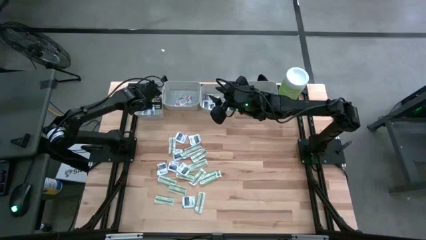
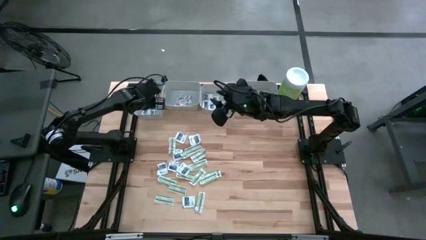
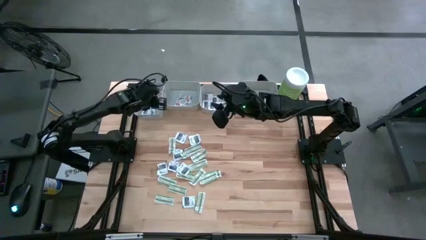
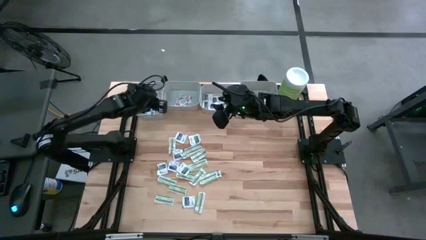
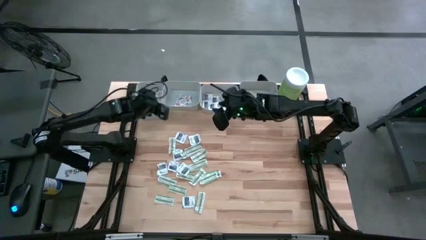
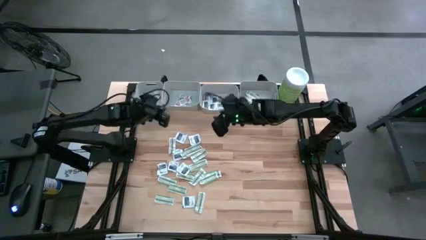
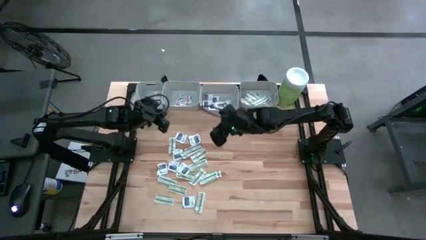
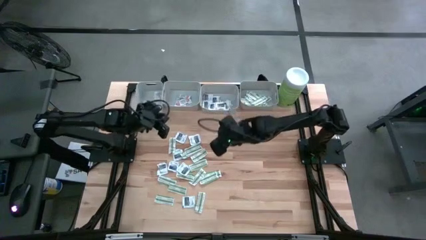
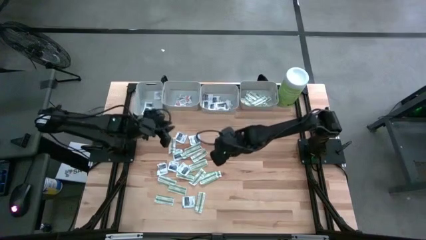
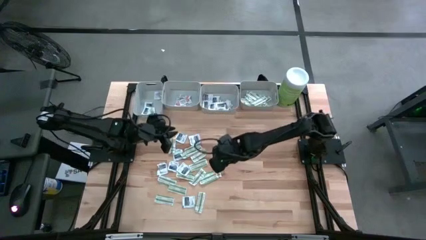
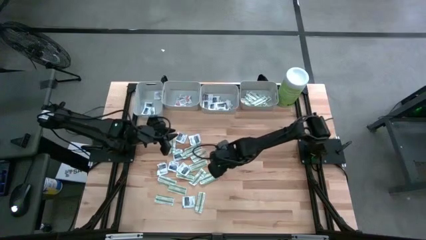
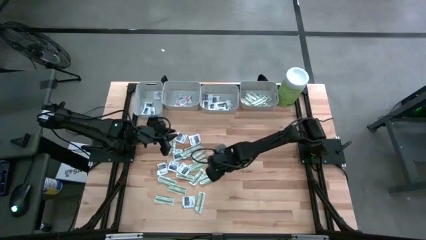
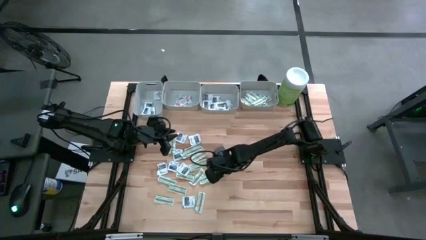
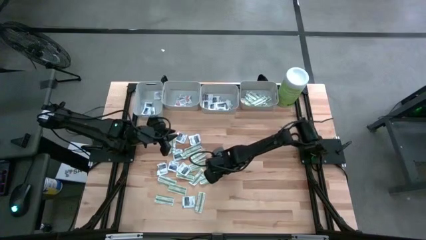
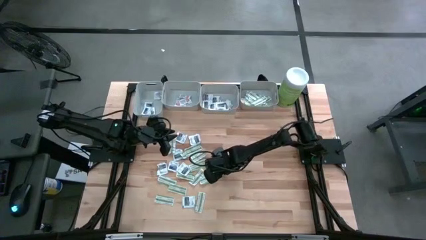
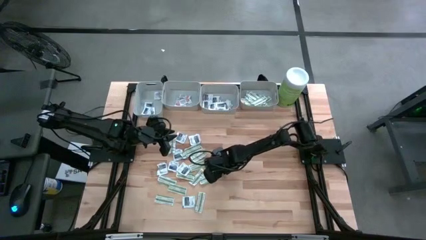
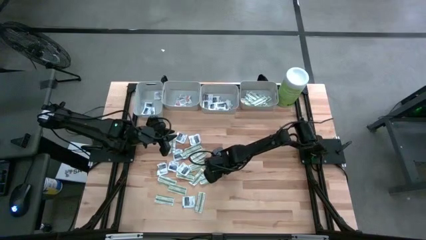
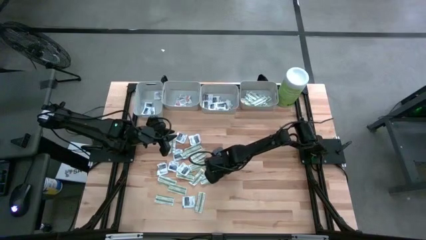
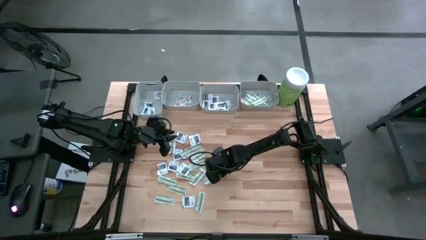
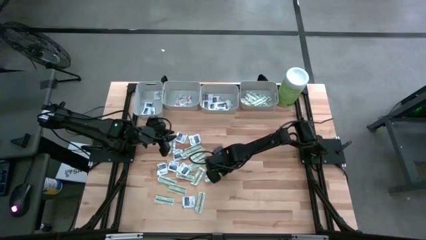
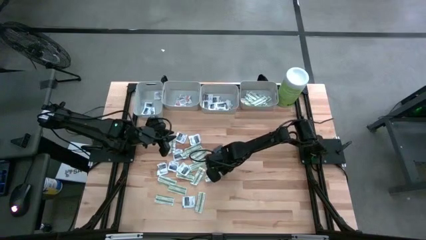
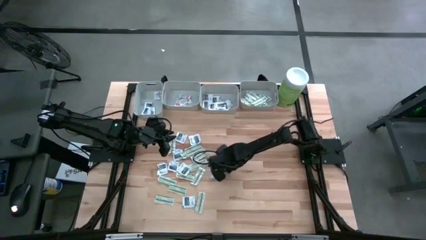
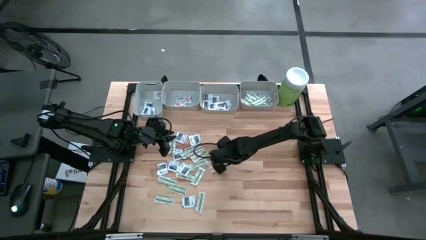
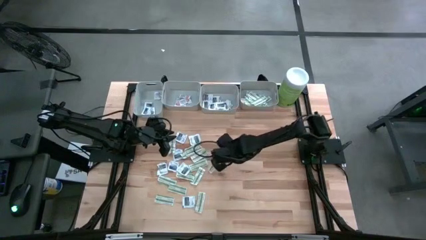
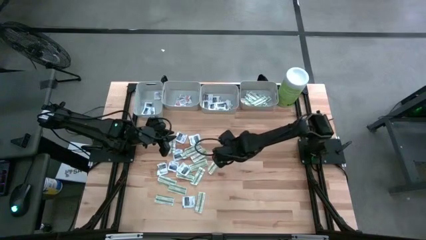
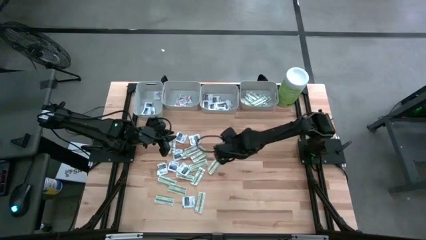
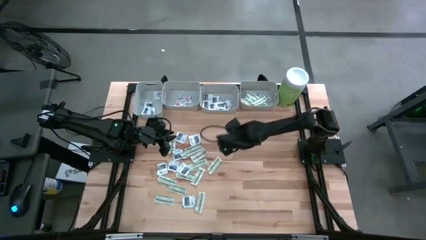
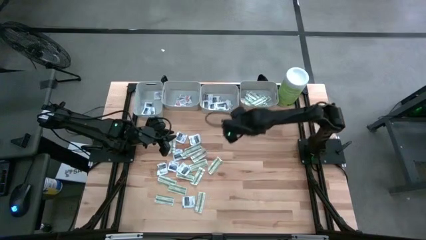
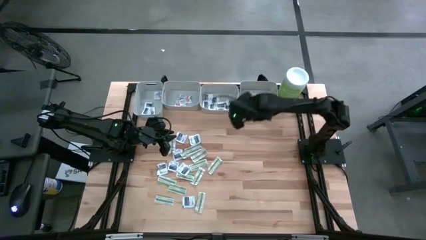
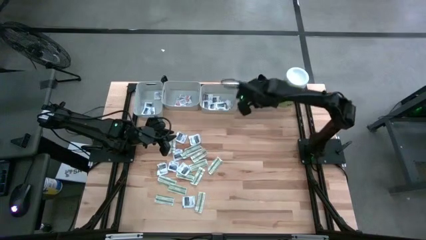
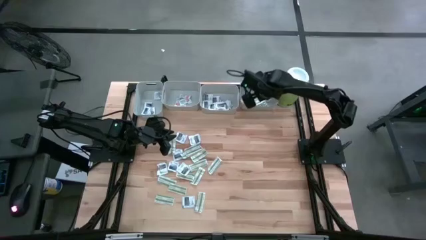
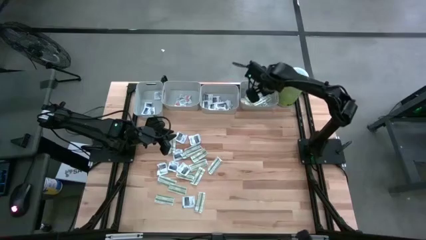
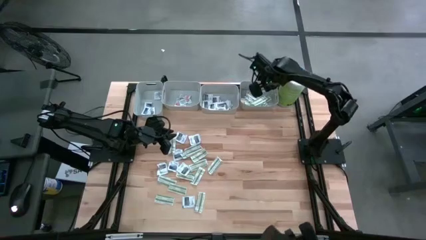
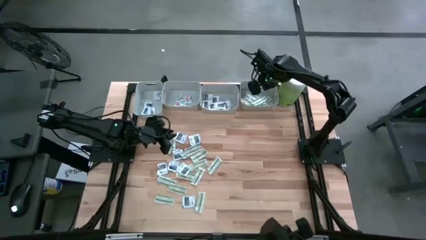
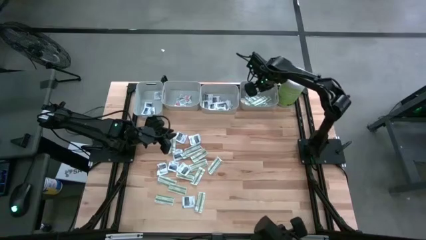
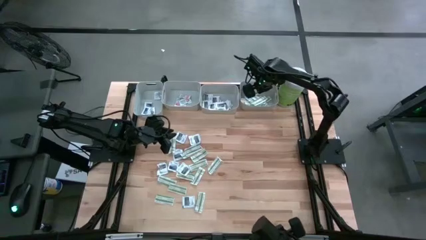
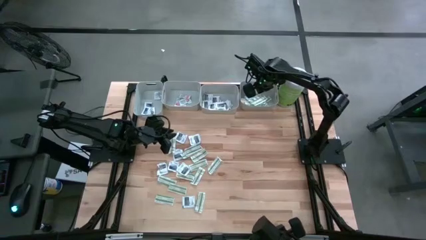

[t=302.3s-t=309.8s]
Task: Pick & Place First Aid Supplies
Put the green bandage into the right gray bin

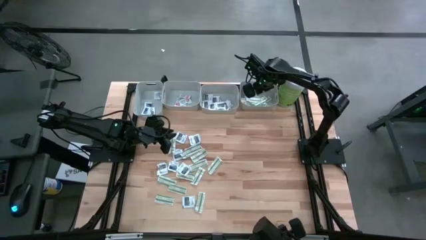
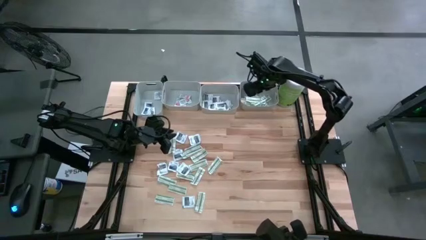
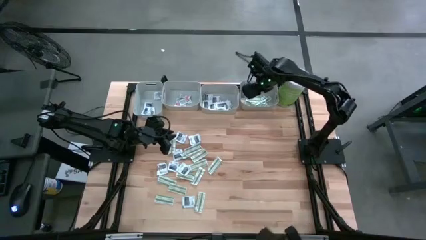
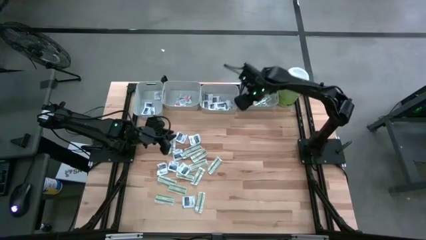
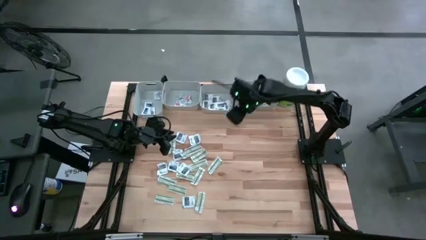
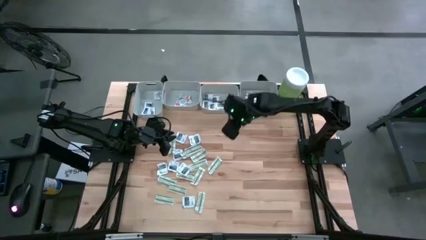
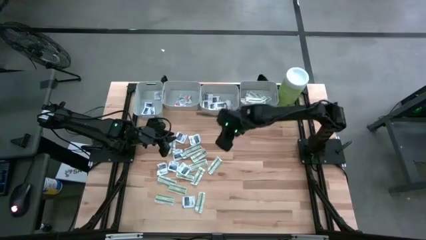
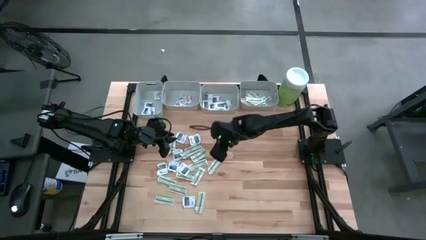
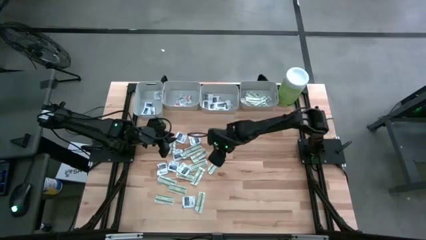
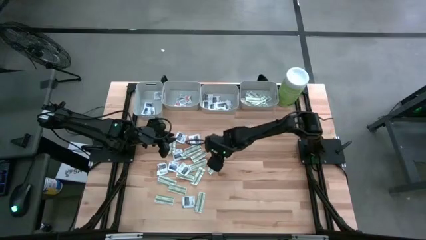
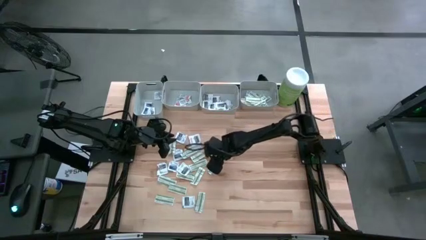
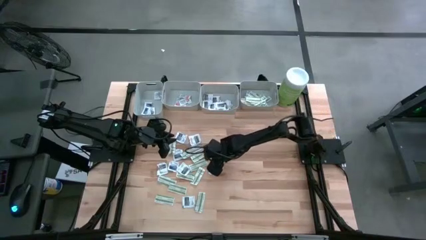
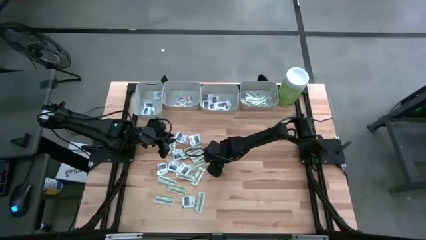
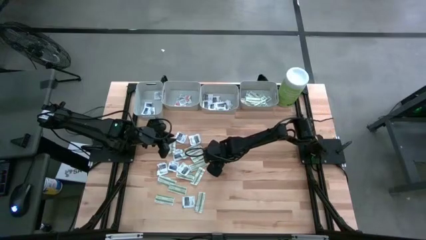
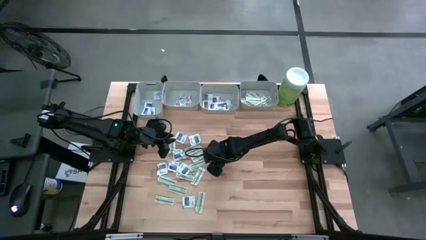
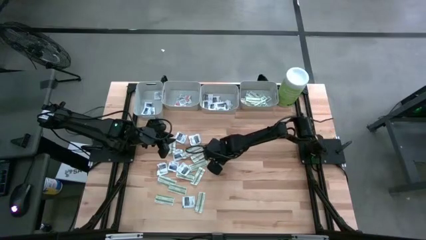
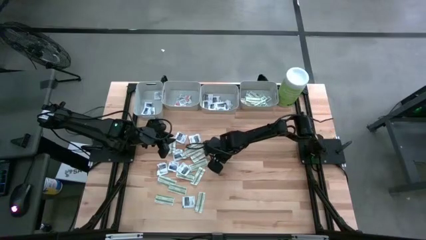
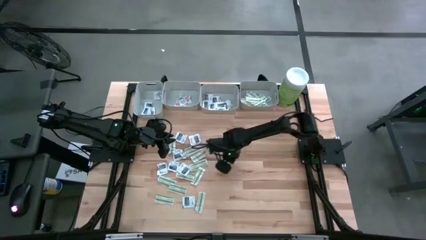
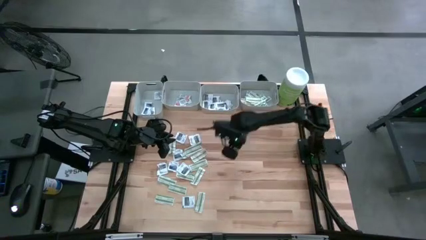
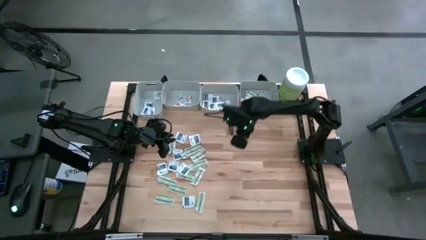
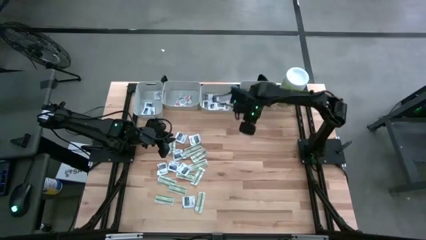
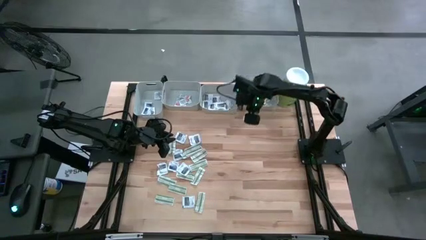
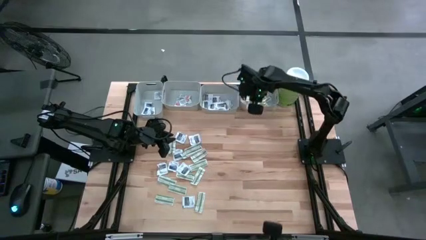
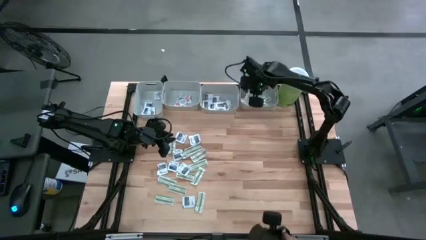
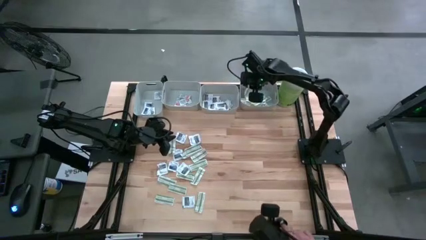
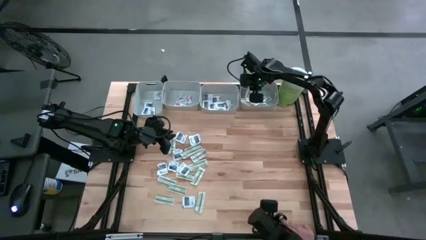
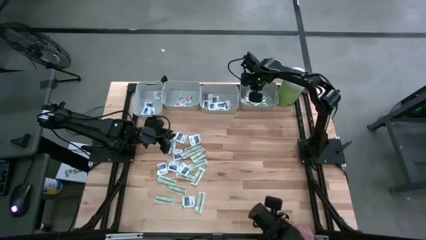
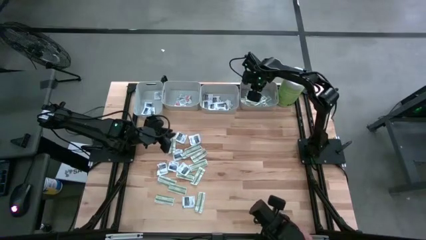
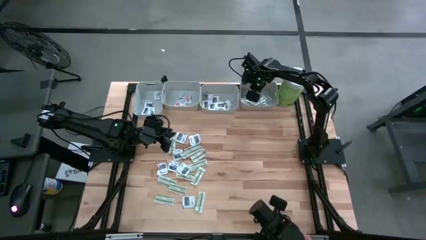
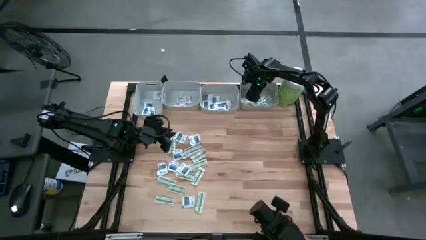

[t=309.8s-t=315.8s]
Put the green bandage into the right gray bin

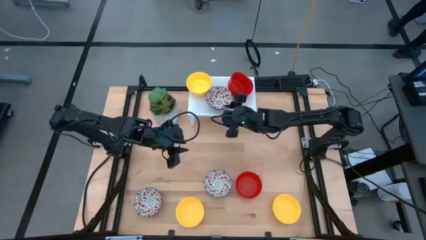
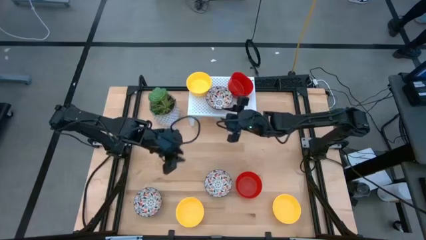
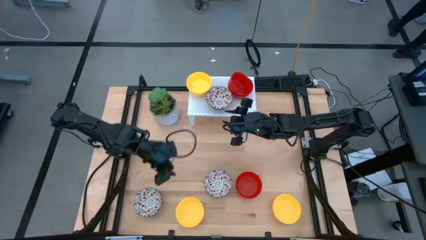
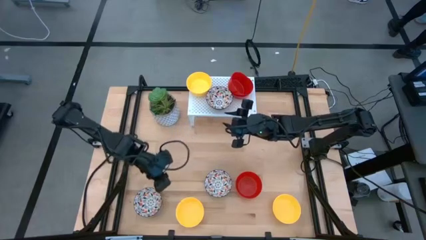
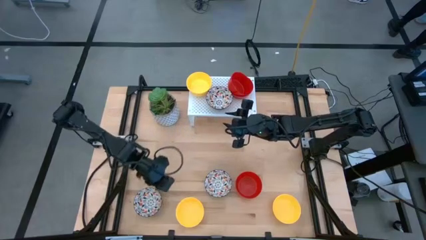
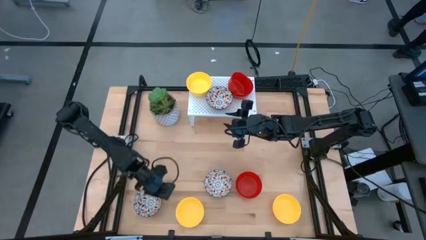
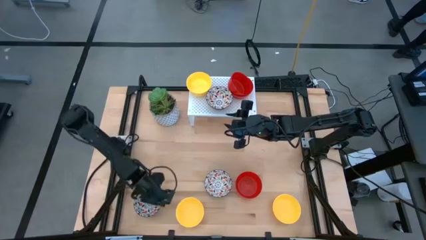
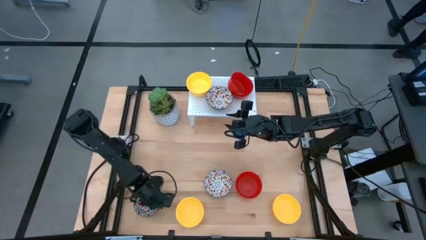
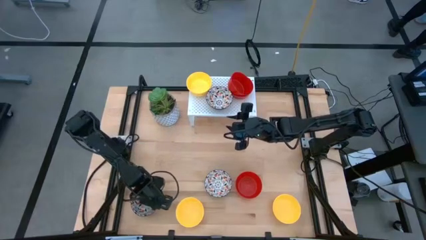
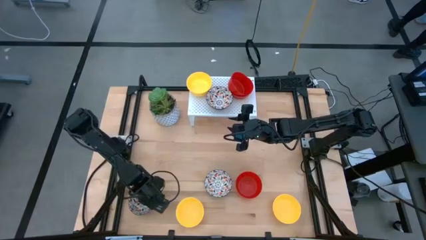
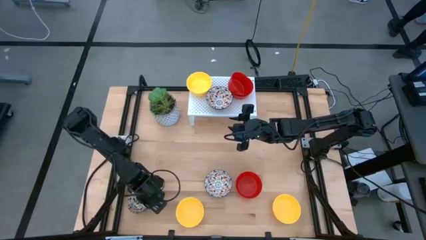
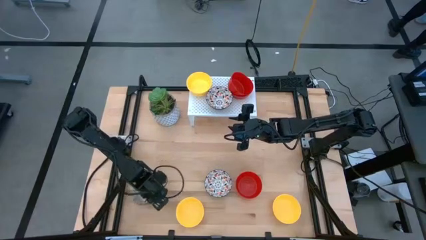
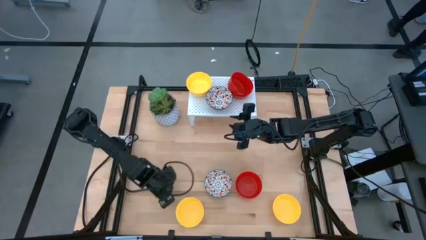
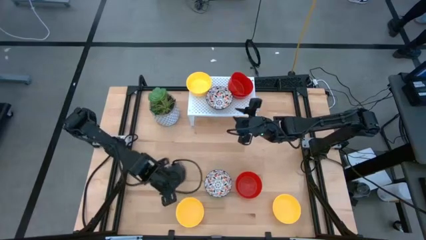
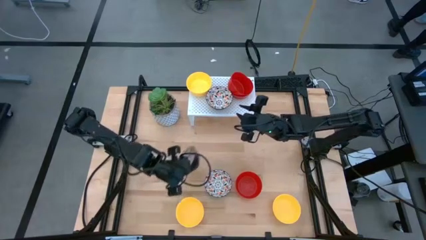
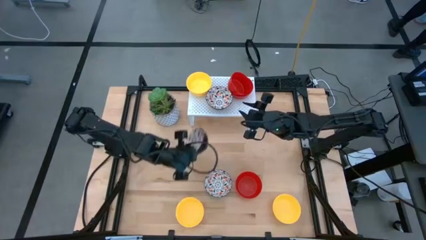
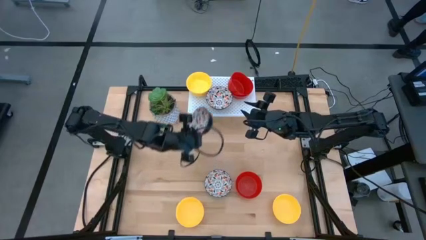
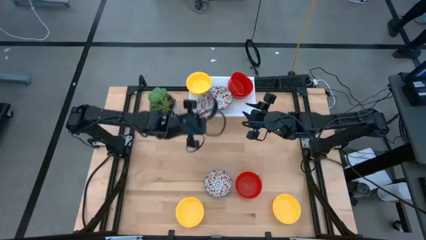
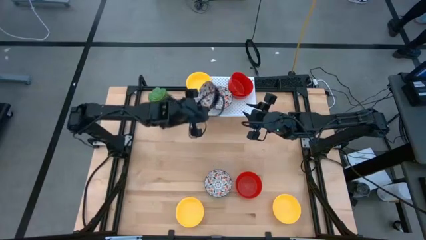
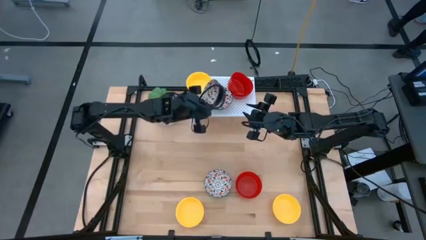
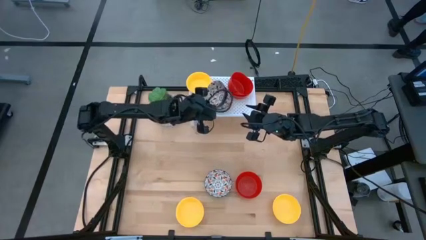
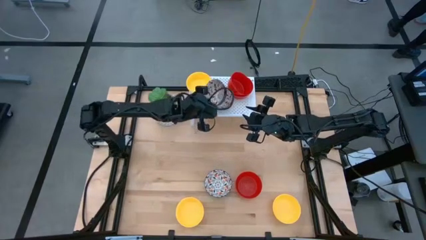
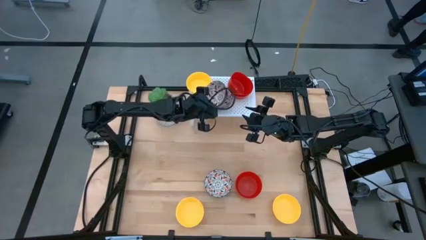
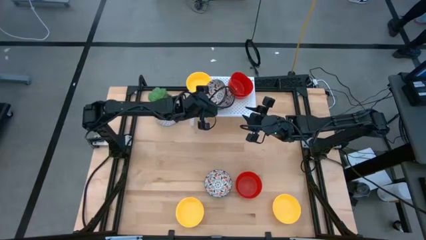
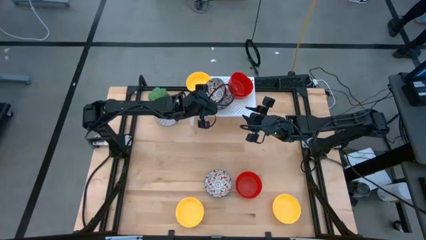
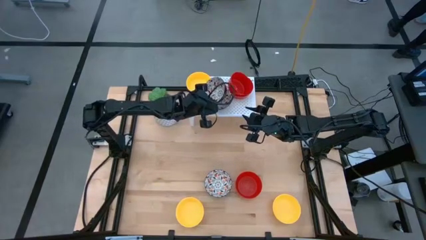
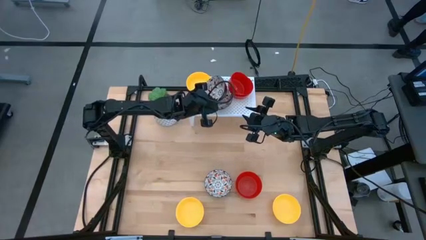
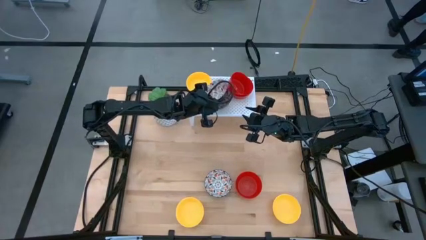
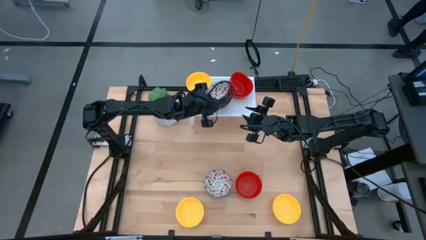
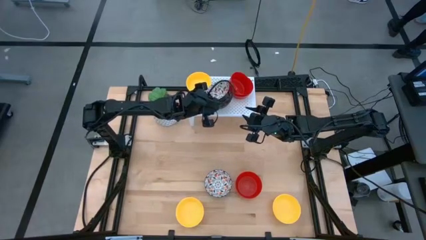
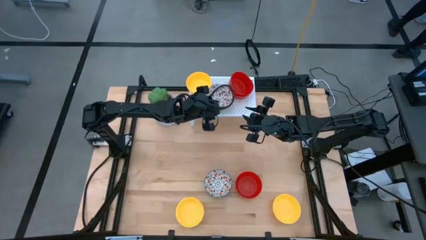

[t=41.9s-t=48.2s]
Task: Pick & Place Mini bowls
Stack the white patterned bowl on top of the white patterned bowl on the shelf
